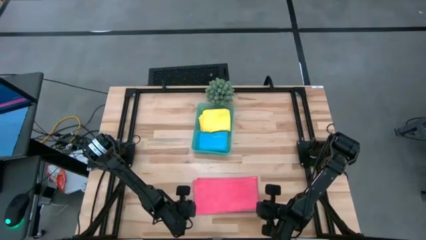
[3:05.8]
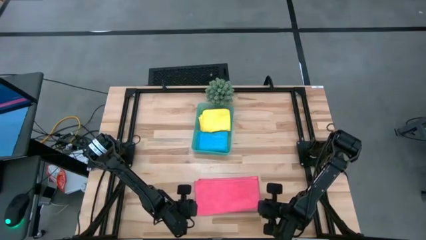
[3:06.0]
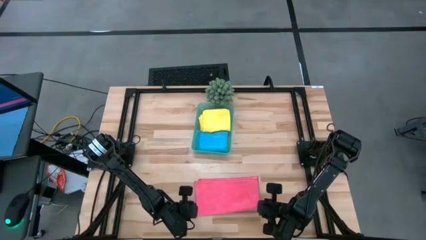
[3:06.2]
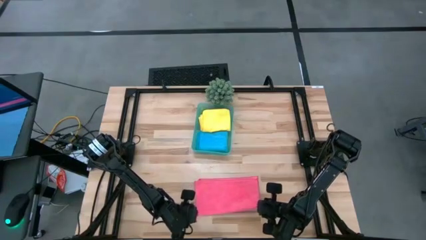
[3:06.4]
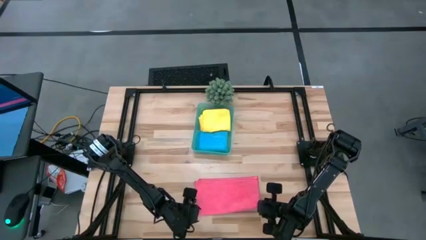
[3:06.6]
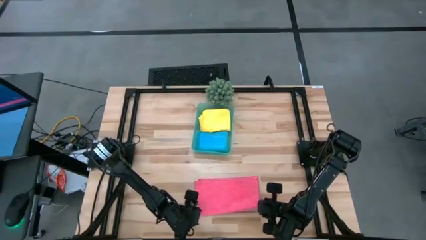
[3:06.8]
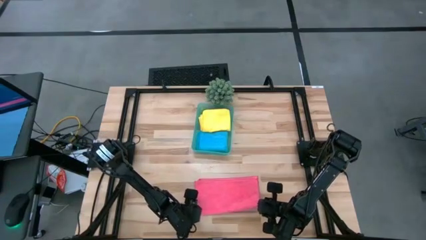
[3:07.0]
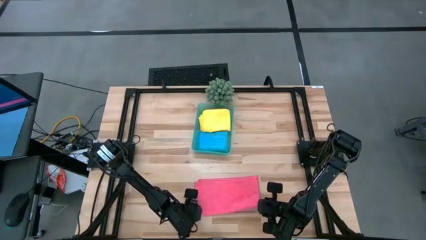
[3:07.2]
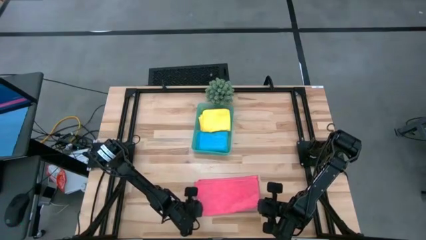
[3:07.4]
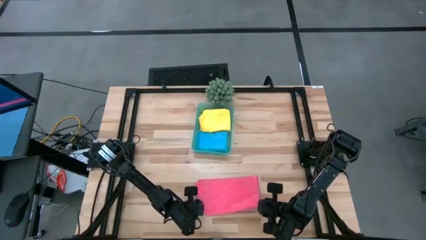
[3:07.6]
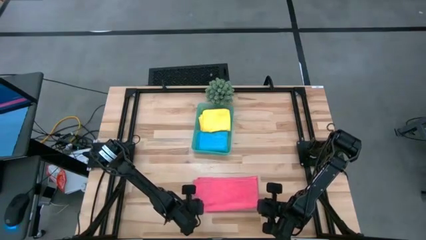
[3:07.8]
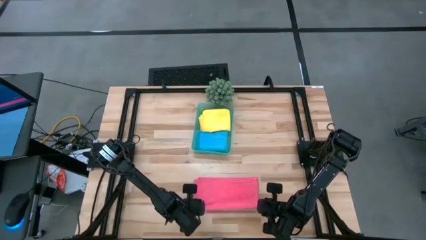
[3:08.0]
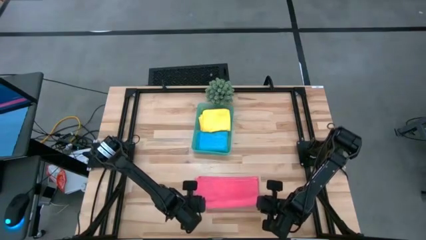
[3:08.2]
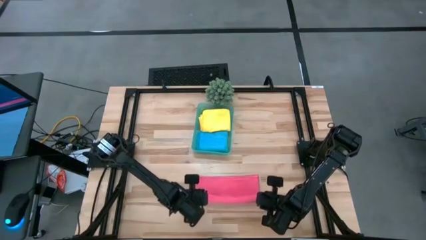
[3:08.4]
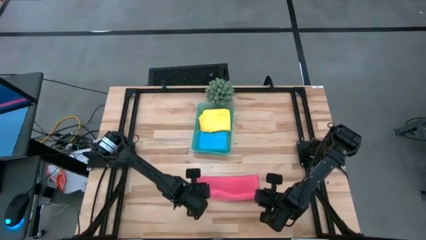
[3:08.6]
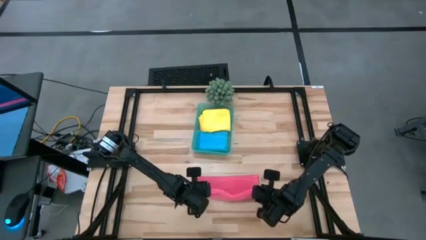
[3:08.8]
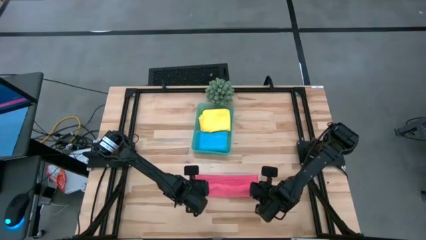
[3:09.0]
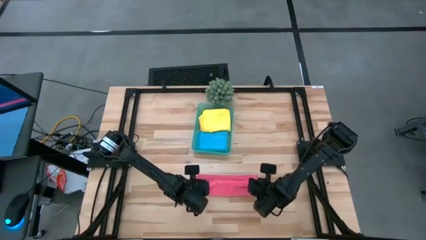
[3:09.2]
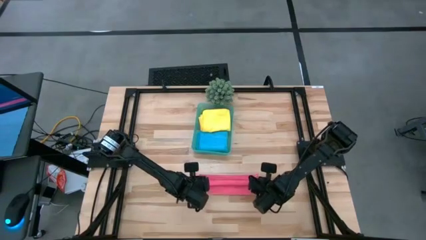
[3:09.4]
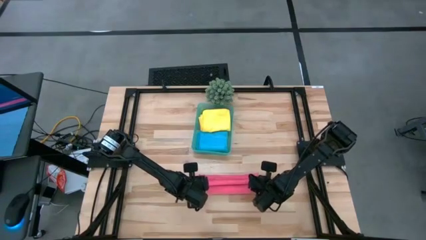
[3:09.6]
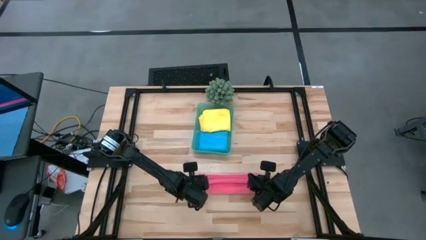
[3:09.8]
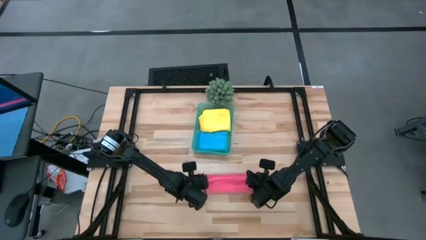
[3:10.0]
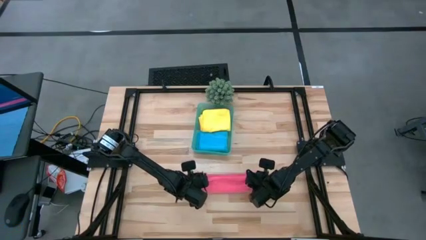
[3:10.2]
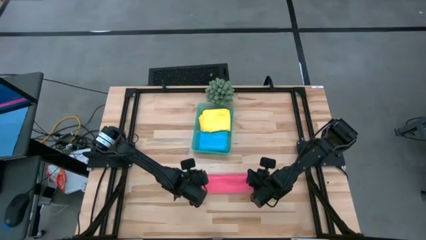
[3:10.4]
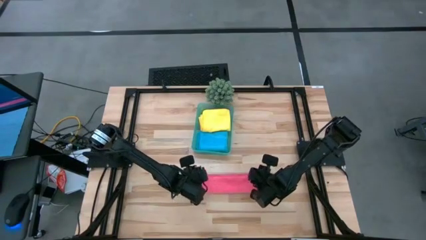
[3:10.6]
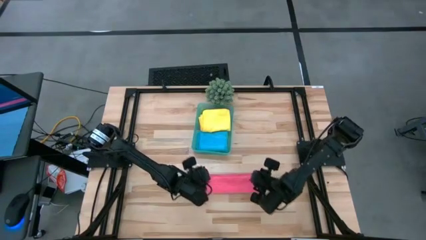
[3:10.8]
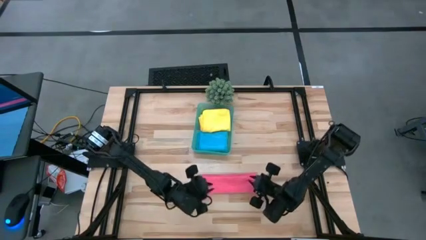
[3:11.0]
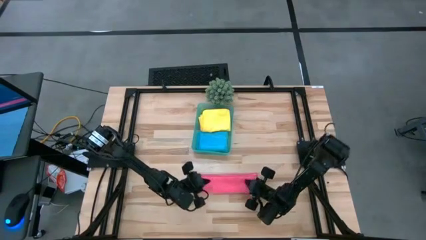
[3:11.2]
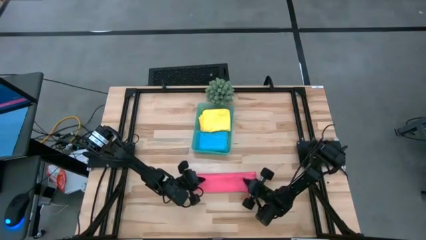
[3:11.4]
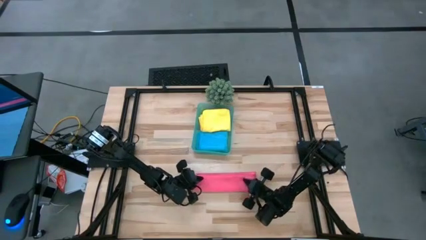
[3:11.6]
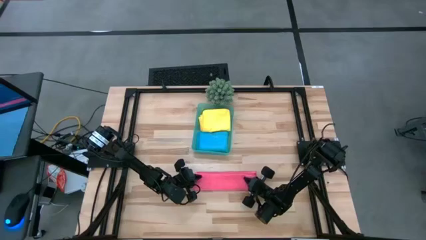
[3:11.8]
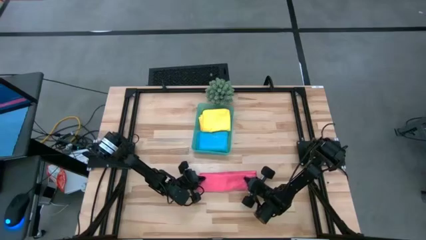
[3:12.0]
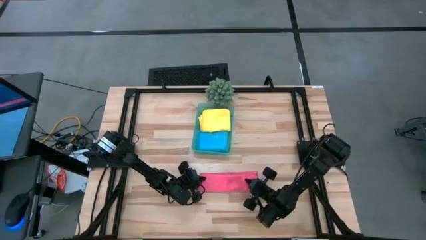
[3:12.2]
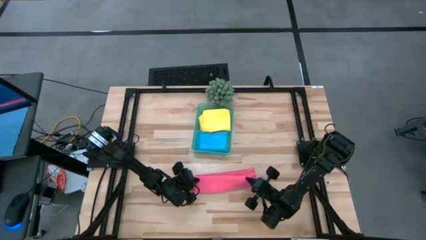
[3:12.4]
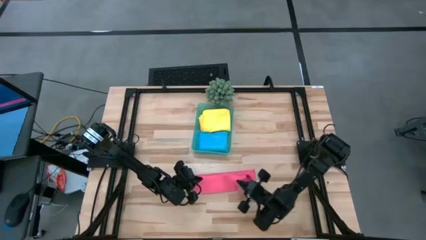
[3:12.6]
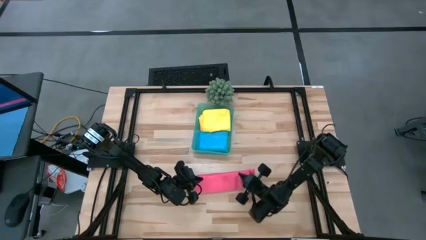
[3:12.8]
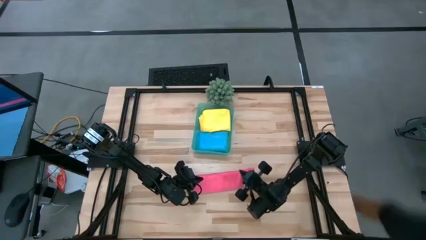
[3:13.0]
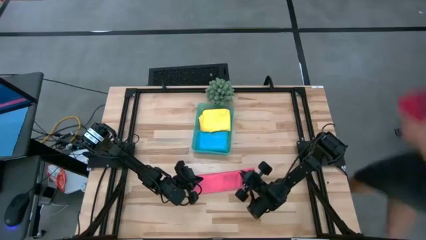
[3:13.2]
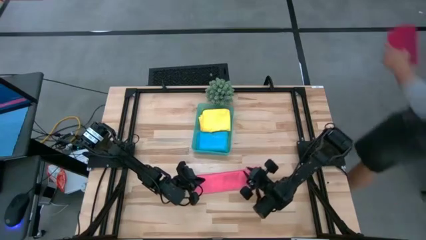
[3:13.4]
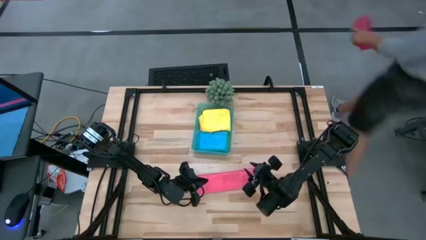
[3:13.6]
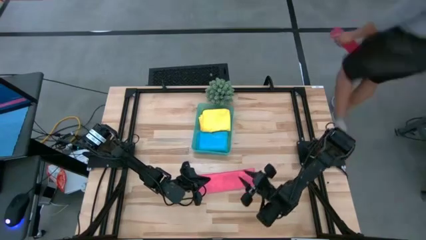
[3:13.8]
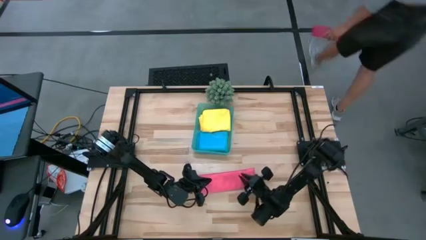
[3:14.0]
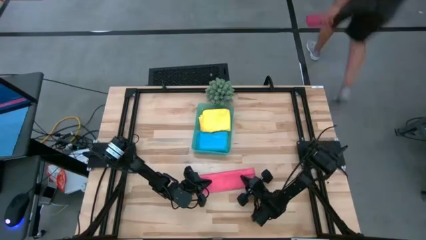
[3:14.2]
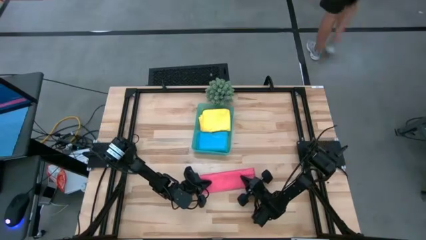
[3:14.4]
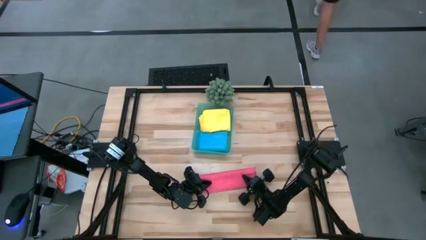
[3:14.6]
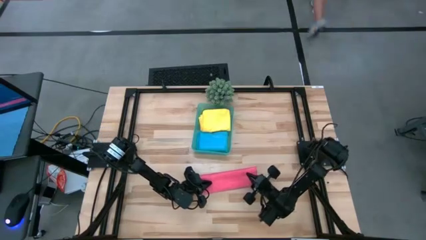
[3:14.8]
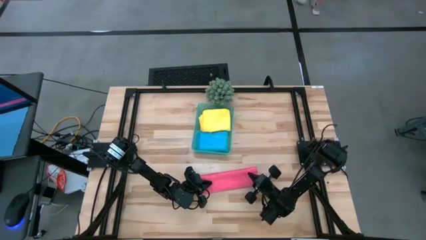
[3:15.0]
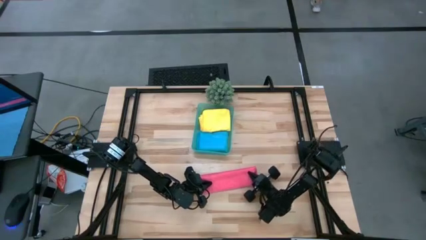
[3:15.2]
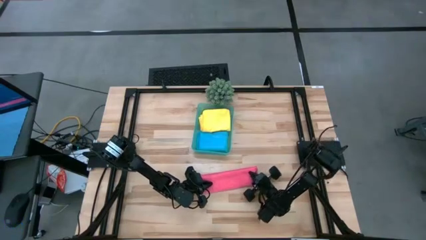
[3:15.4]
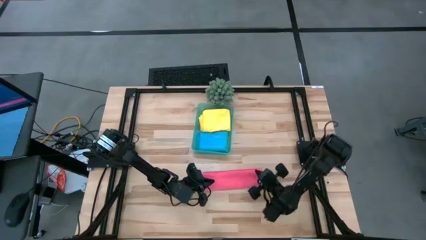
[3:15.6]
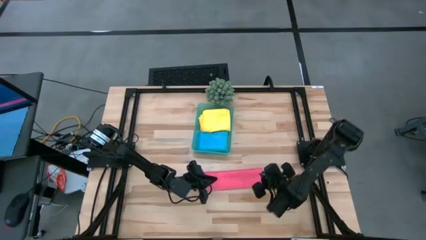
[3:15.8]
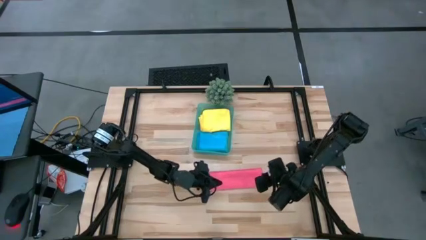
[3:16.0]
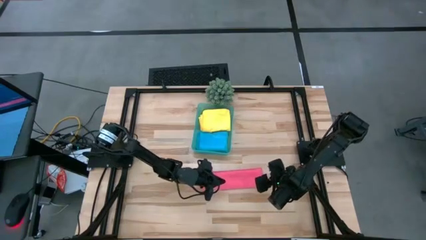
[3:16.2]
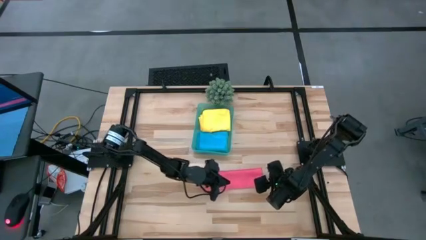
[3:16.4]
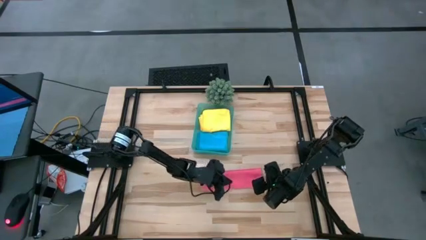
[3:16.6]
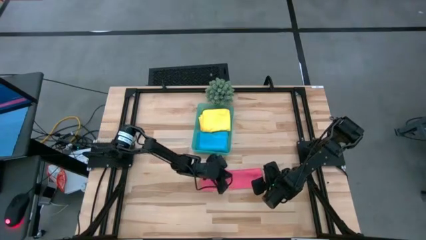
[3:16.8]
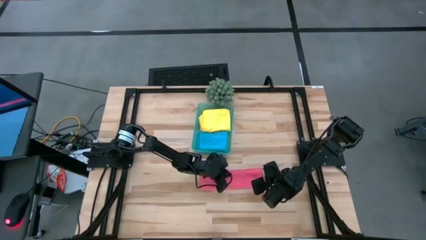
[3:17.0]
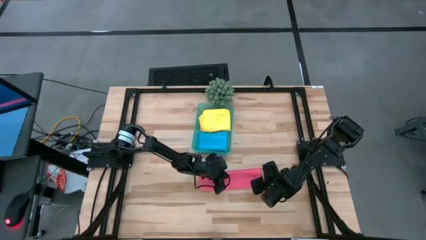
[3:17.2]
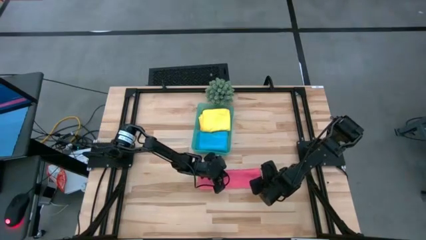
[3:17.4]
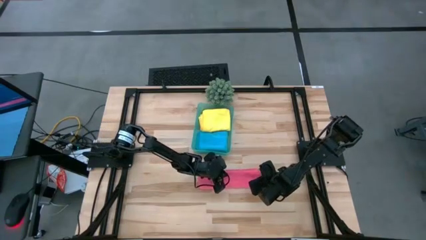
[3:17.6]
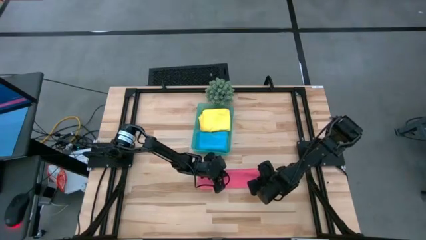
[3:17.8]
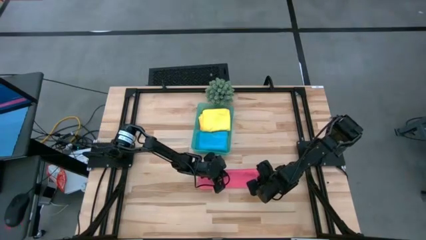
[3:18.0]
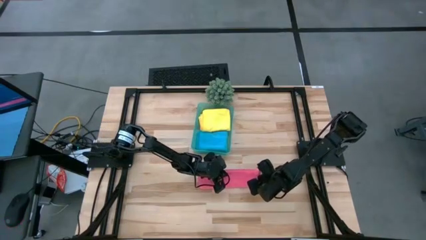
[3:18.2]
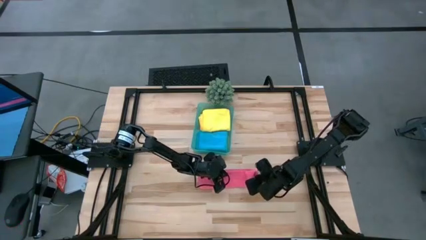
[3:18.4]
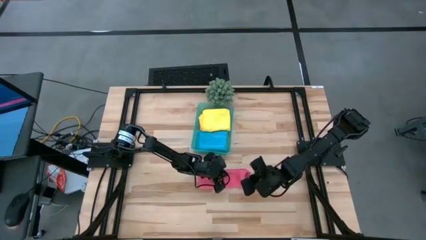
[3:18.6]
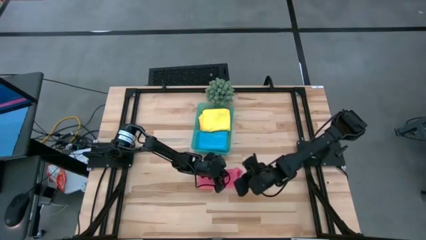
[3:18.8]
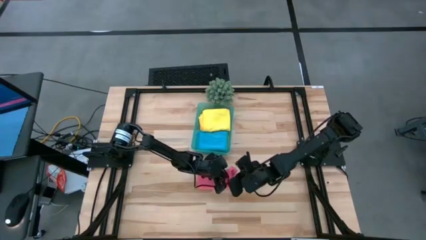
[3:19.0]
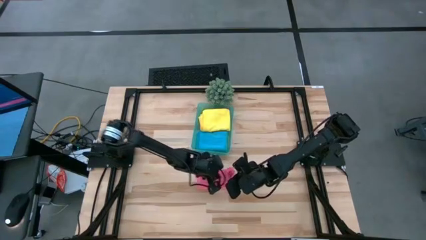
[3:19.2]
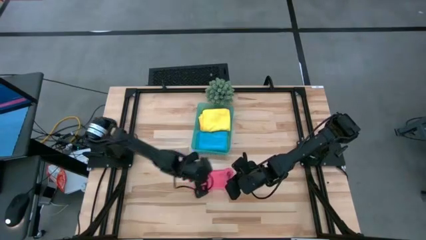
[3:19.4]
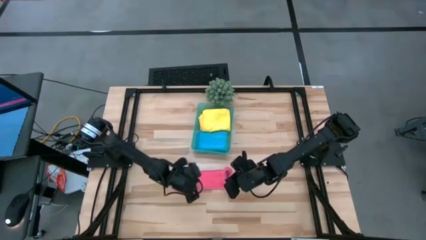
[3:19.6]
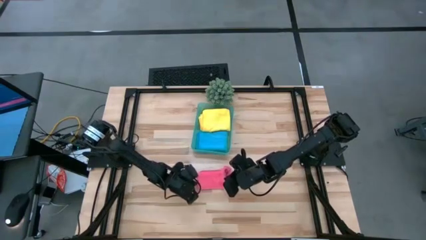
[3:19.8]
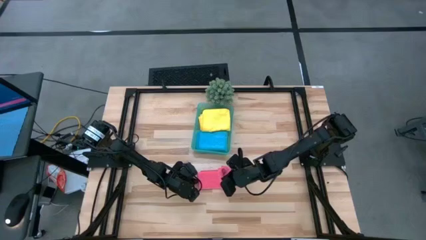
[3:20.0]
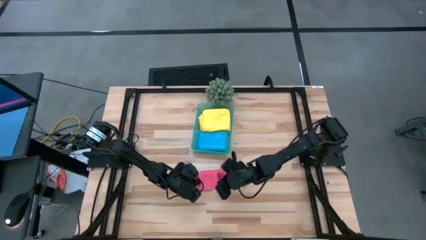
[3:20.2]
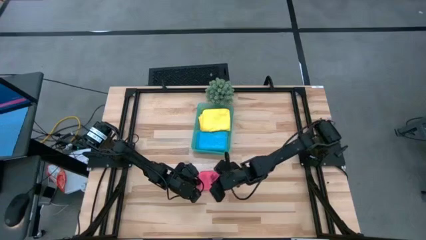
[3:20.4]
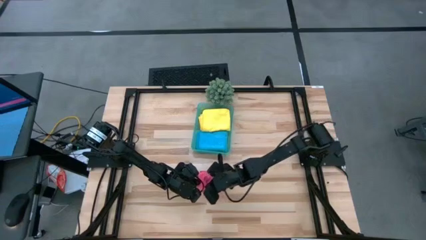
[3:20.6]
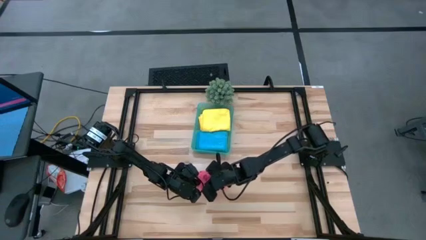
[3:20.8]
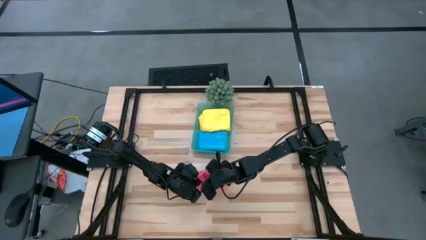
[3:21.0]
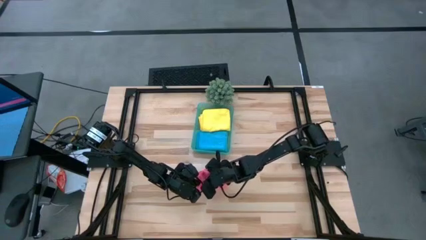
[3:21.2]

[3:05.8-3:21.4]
Task: Fold microfiber towels
Fold the pink micro fiber cloth

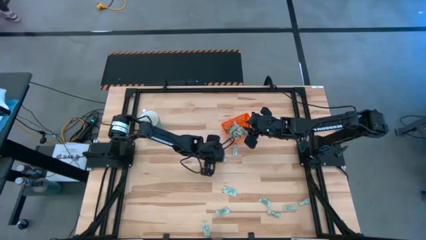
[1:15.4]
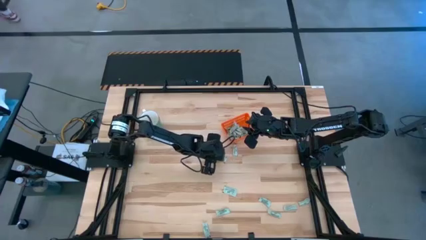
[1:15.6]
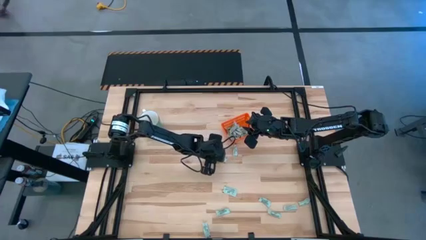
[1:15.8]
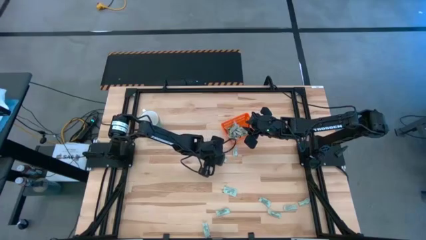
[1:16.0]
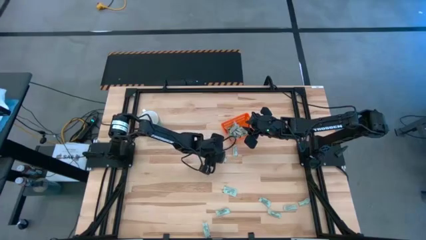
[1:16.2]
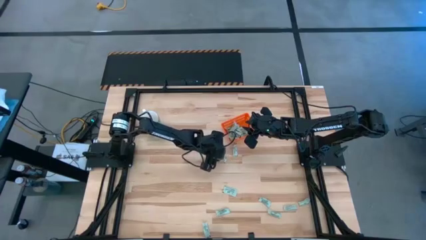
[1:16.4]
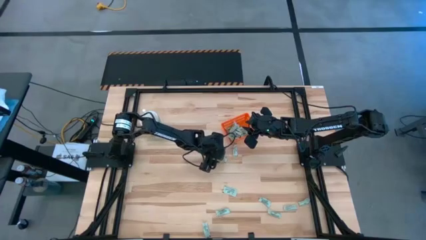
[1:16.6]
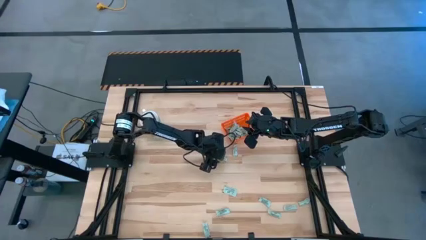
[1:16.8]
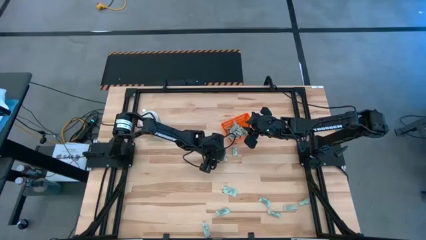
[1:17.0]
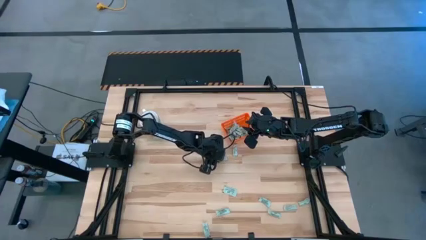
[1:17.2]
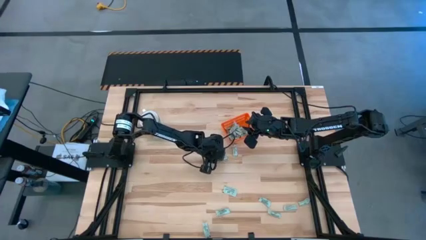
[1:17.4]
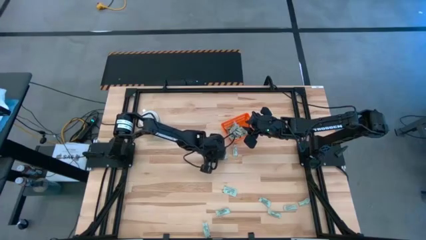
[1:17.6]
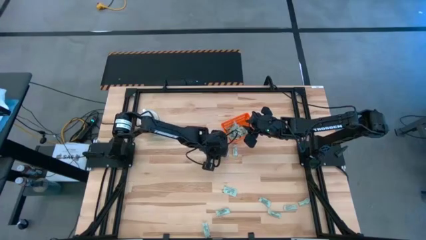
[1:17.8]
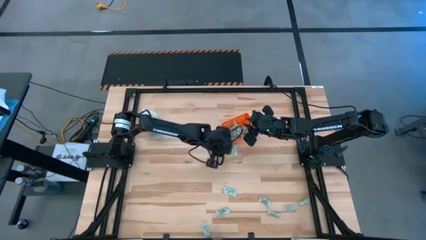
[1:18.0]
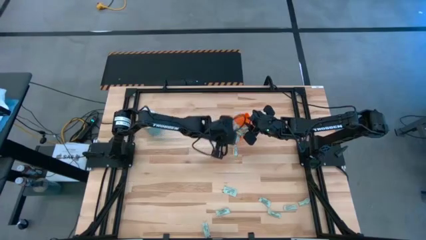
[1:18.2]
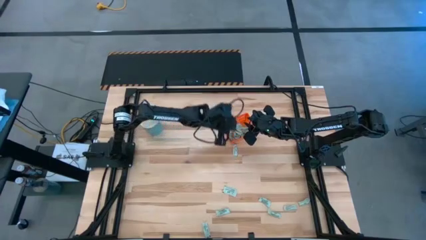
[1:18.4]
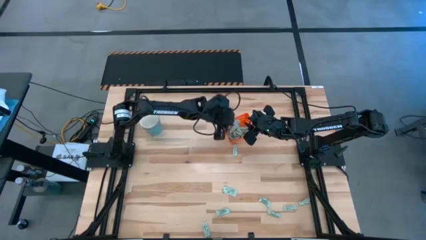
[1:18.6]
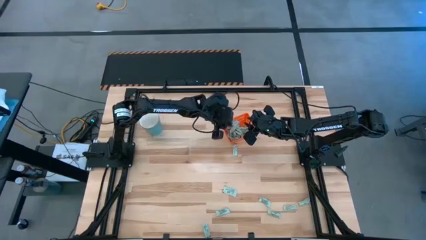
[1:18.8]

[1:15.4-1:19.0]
Task: Pick and place Stevia / Truvia into bins
Put the stevia packet into the orange bin
